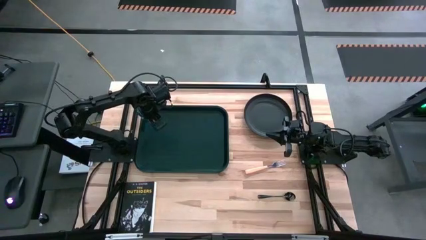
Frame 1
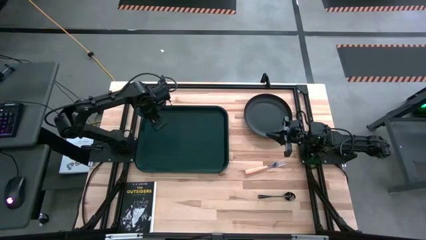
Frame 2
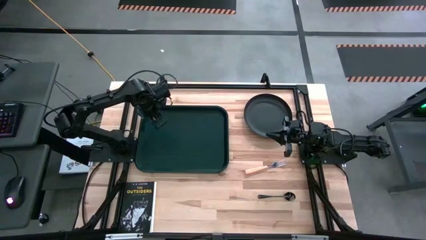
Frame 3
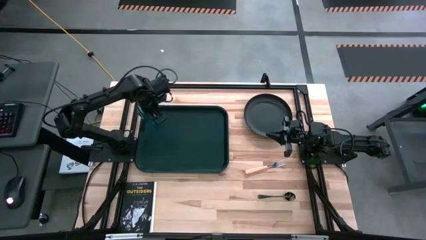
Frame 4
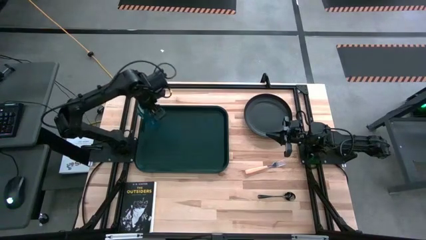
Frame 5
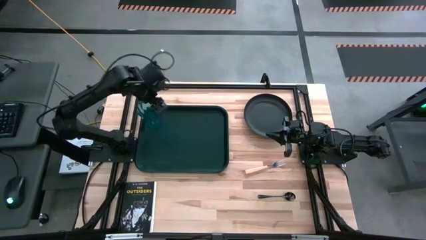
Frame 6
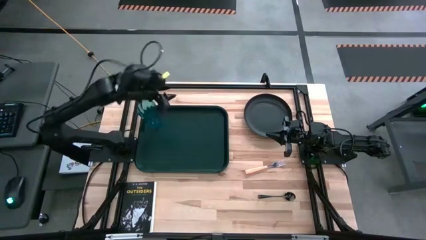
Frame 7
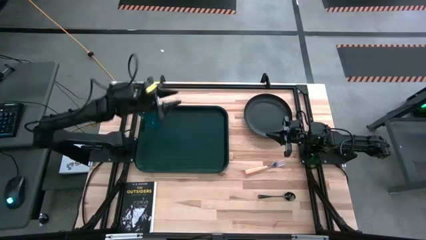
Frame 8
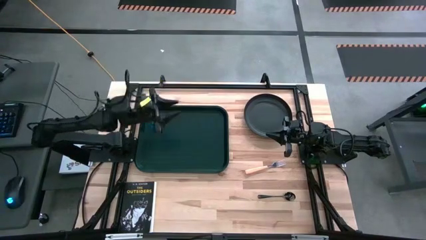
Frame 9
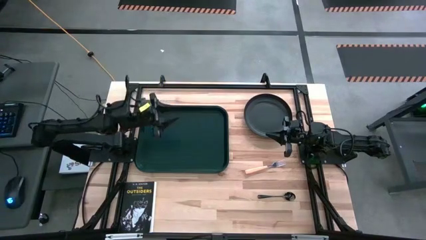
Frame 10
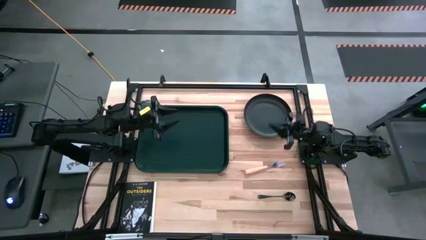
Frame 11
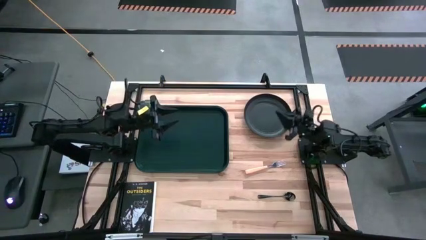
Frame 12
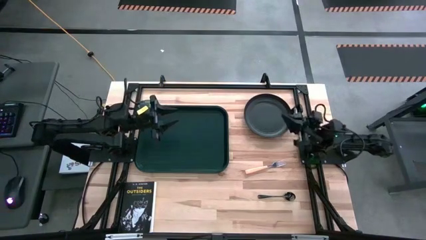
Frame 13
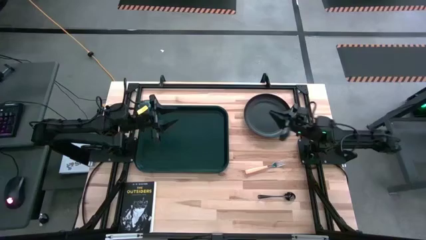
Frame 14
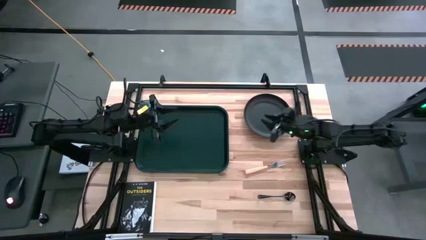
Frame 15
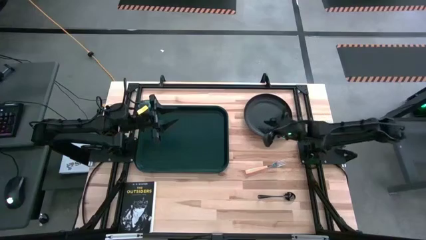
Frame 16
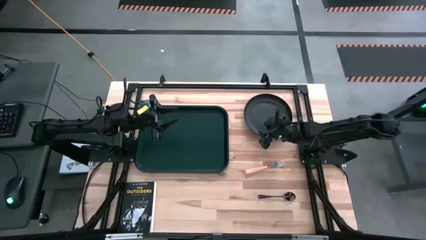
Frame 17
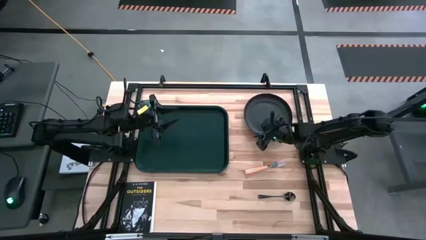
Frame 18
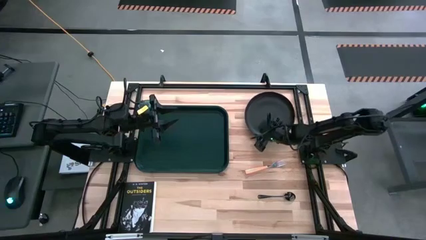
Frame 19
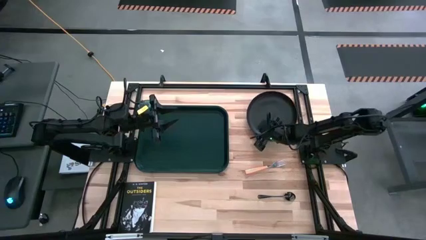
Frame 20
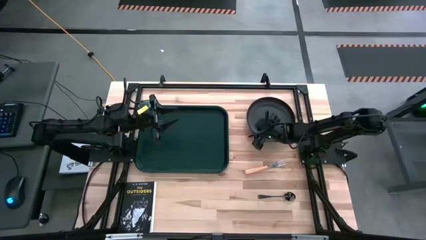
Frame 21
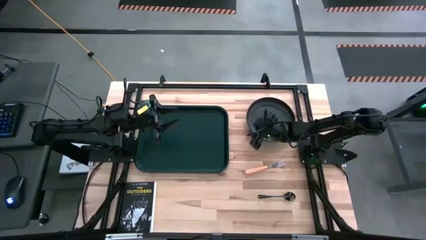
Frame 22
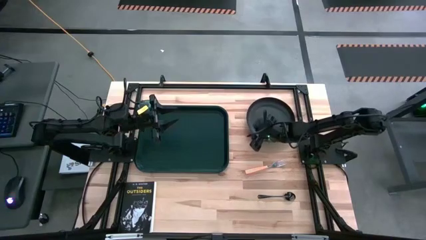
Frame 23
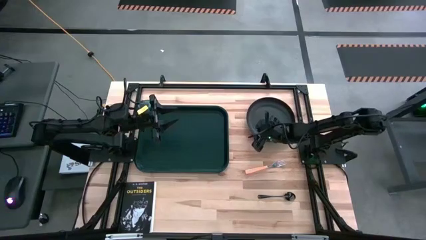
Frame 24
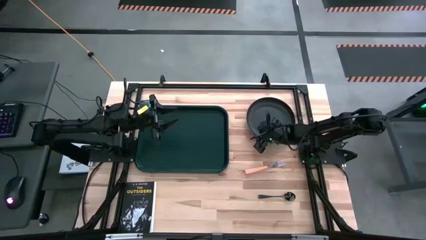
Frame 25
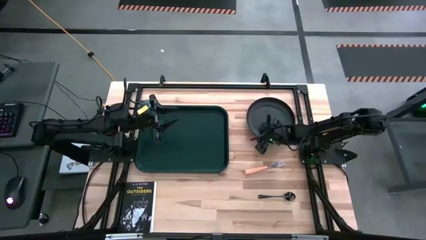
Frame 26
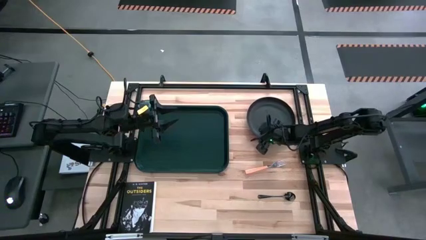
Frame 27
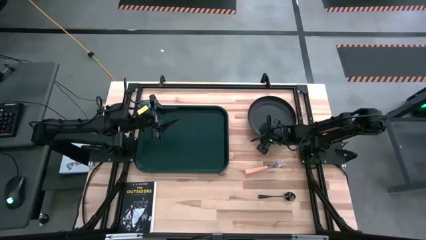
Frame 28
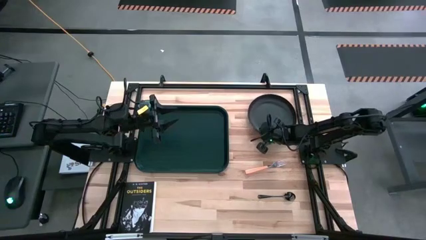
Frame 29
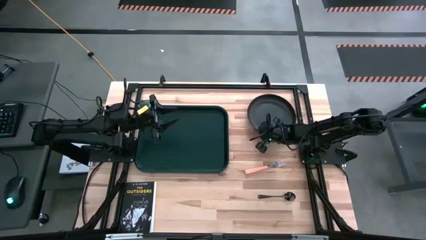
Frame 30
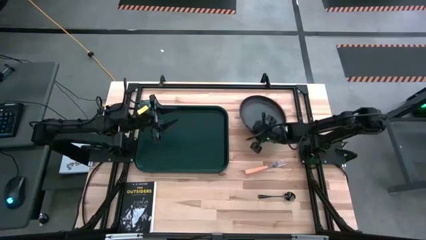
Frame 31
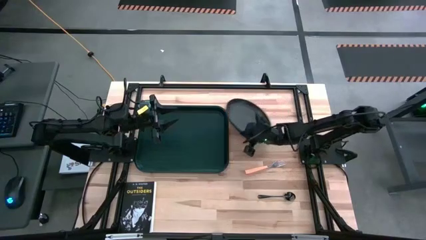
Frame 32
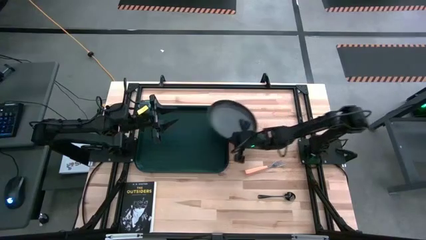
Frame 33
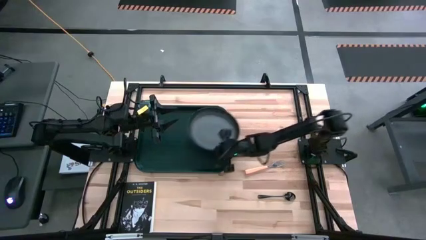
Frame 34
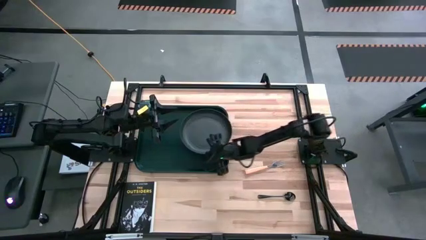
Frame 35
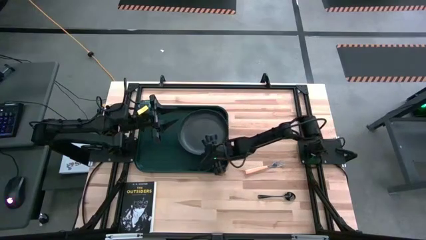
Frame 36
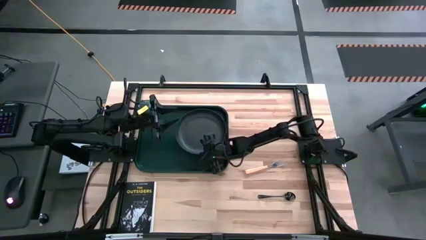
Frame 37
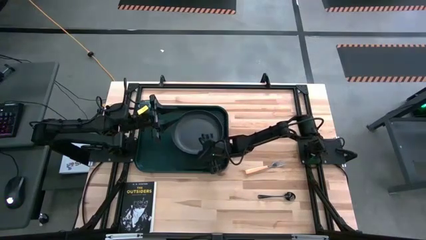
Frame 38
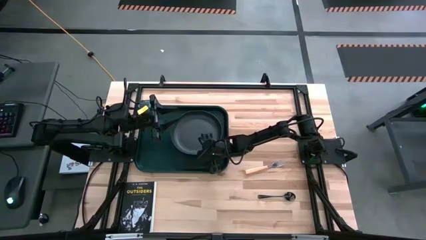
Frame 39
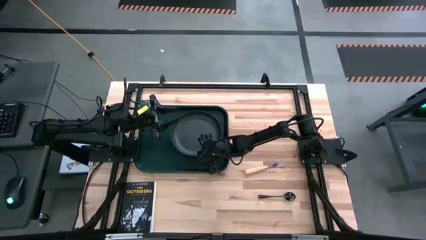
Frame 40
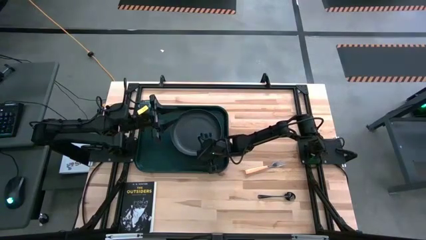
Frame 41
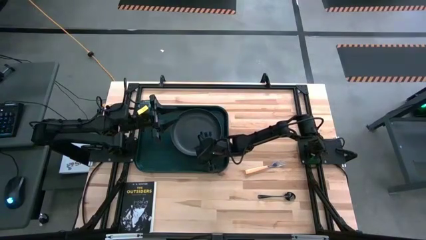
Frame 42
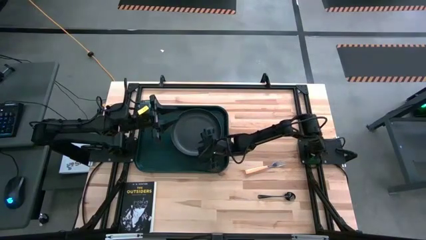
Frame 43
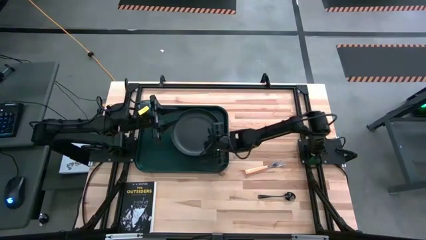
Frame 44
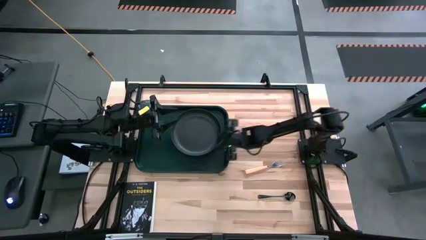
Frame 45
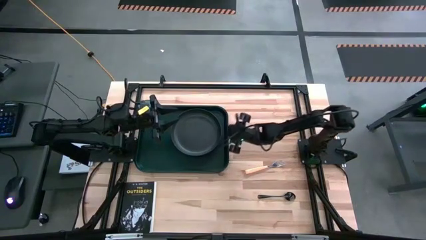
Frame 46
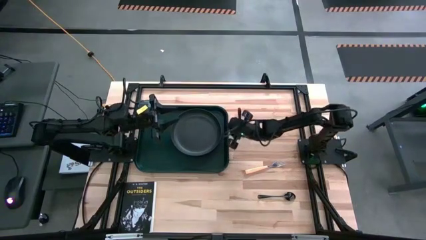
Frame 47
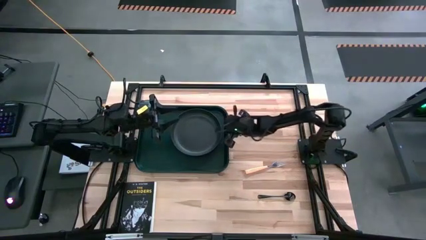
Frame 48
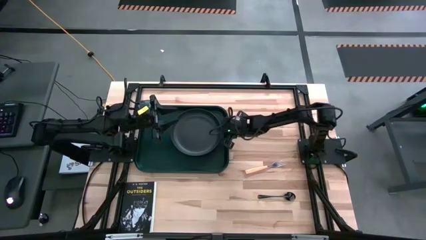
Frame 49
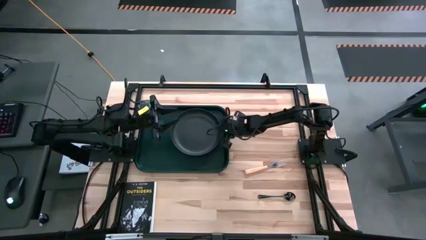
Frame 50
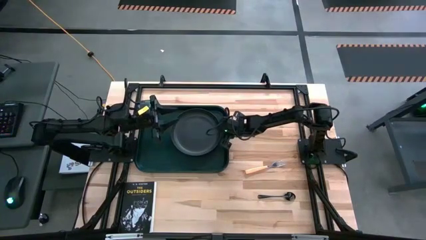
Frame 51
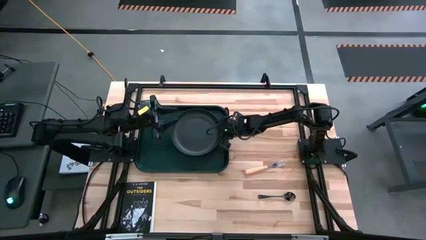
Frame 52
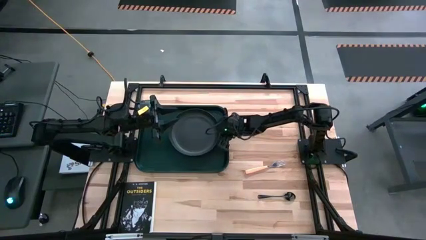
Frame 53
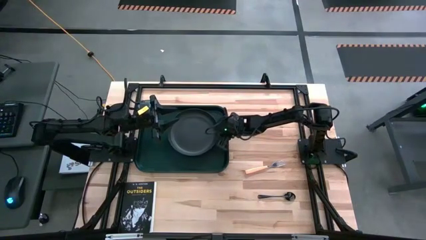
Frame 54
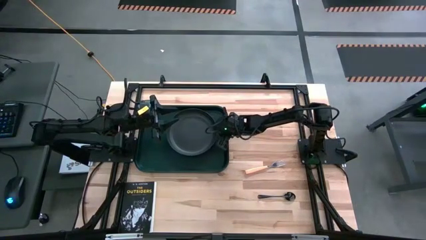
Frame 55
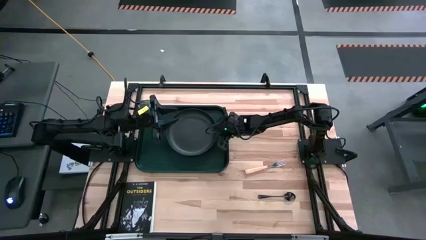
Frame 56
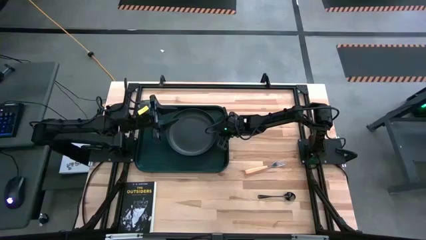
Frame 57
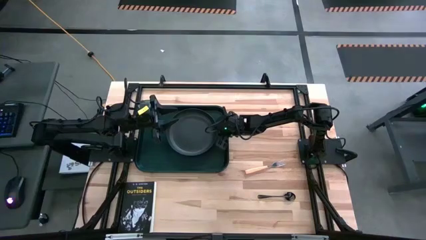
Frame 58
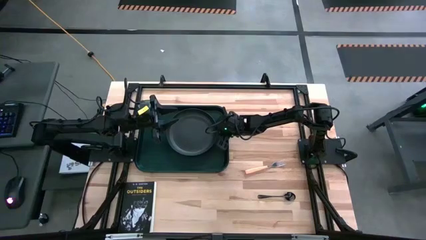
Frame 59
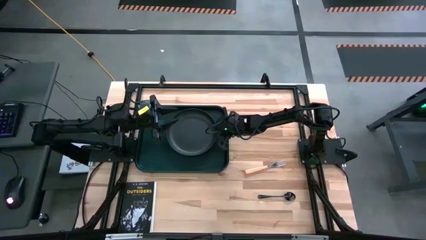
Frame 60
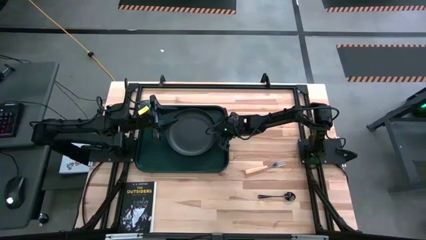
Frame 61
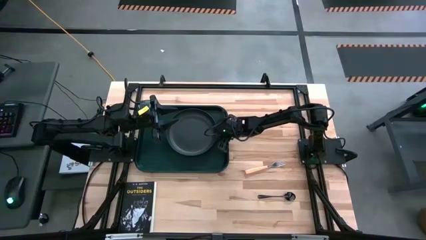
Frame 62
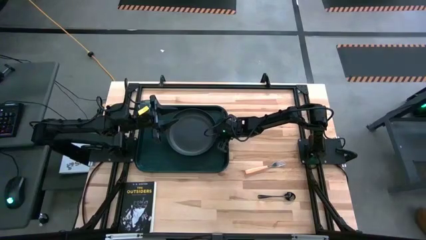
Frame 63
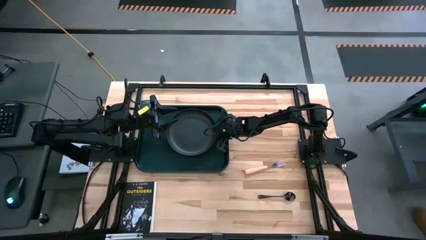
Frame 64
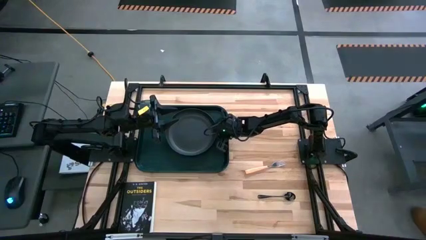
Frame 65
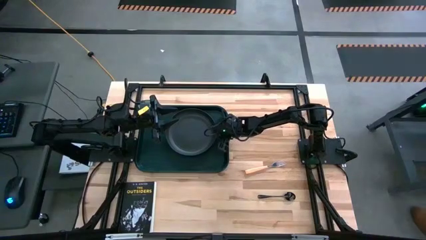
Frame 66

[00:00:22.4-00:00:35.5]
Task: Pick and place plate/cup/fork/spoon on tray
Put the black plate on the black tray

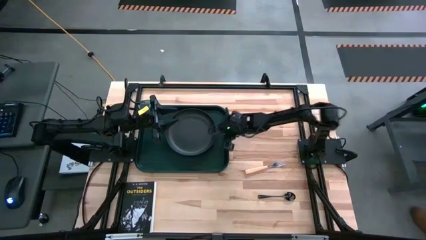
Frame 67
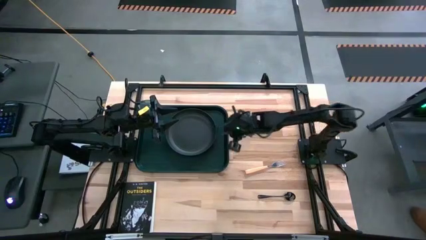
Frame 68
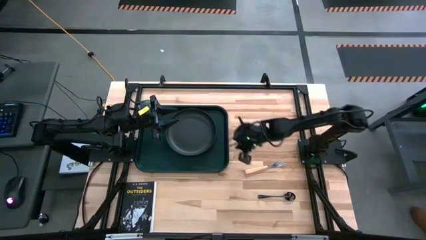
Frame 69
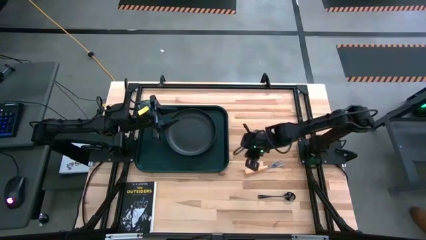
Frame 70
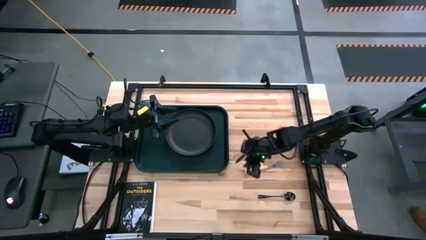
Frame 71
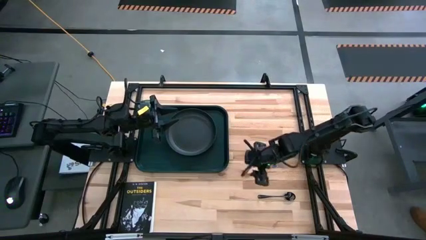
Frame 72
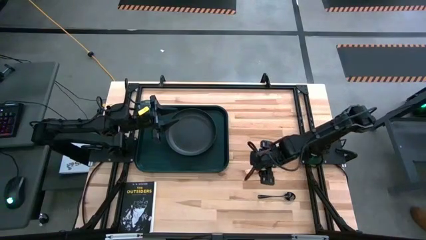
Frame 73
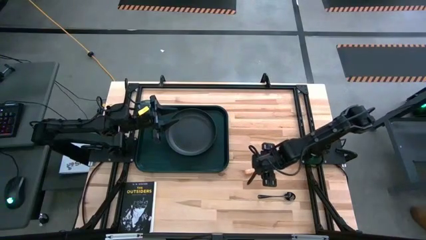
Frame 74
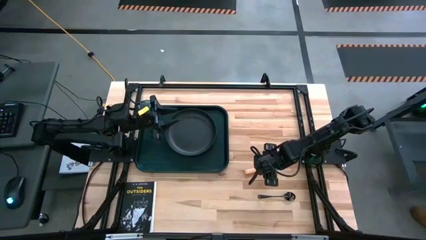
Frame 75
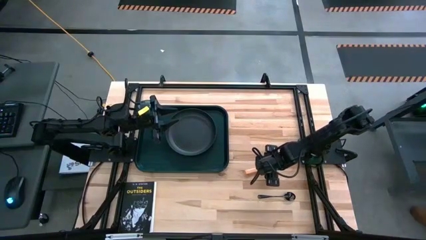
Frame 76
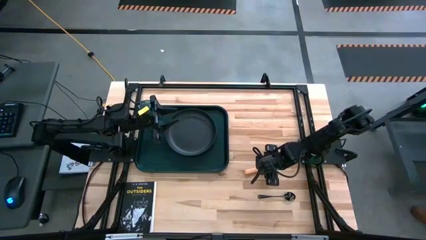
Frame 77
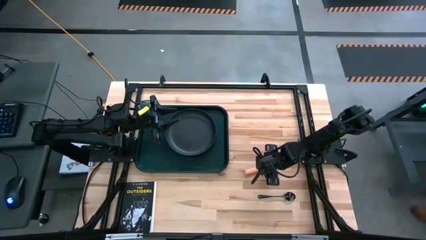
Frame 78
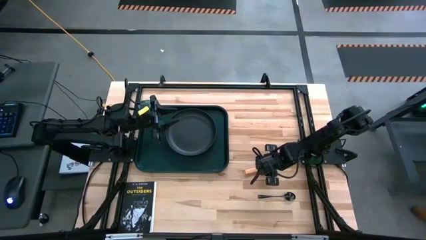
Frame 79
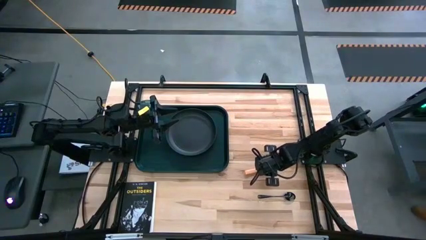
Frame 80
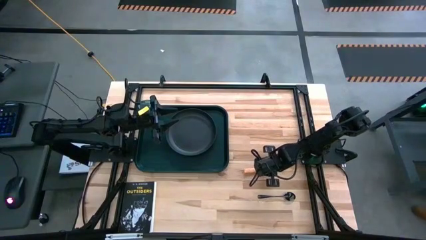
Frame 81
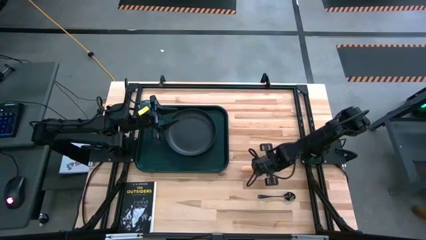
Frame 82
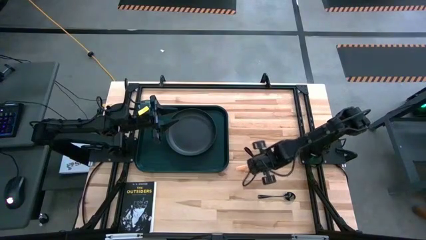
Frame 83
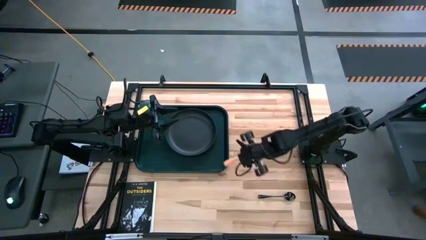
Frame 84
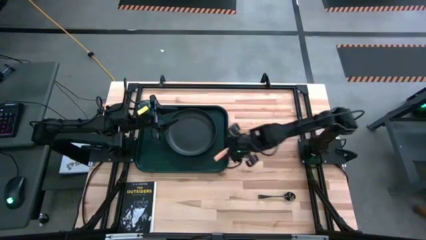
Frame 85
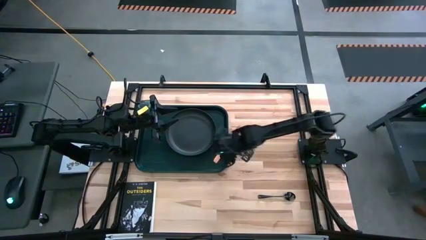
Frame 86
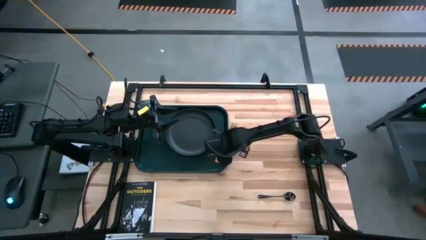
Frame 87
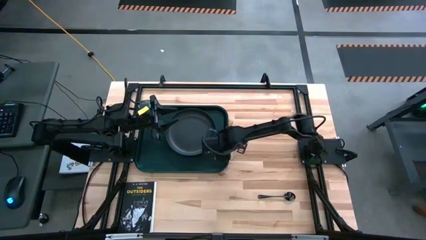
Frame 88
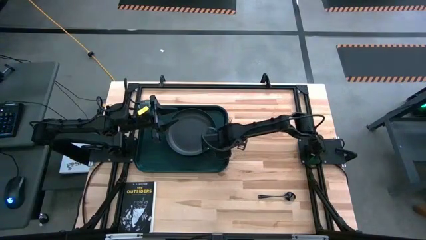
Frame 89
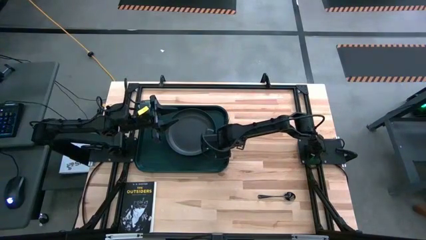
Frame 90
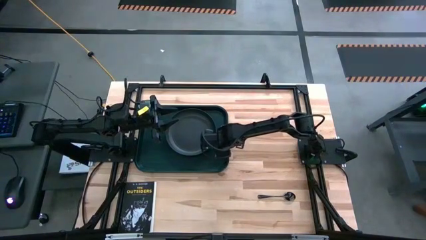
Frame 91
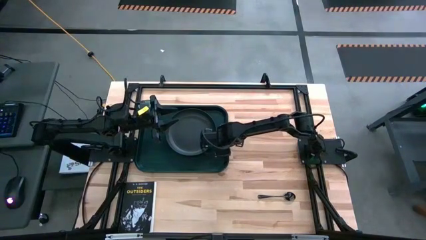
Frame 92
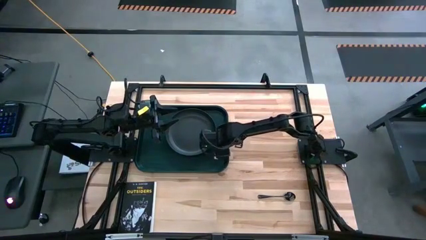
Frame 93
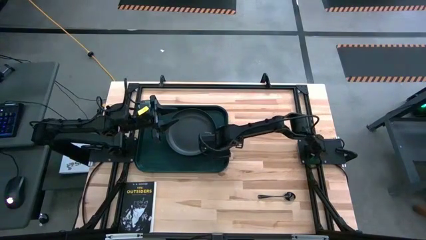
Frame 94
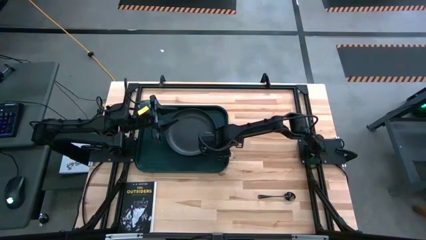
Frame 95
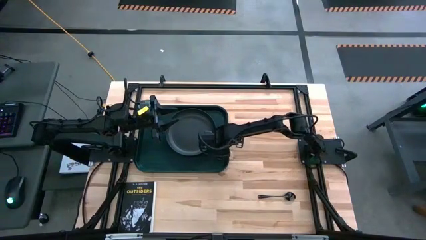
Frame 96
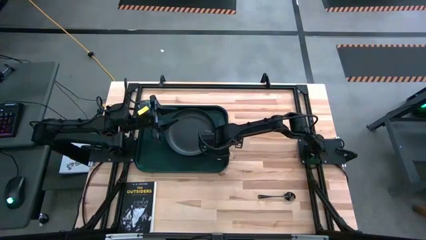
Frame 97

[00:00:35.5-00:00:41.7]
Put the yellow fork on the black tray
